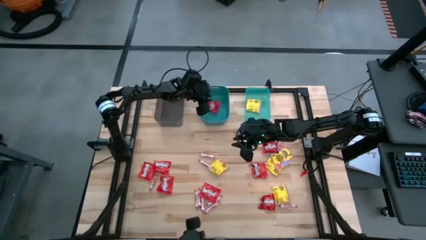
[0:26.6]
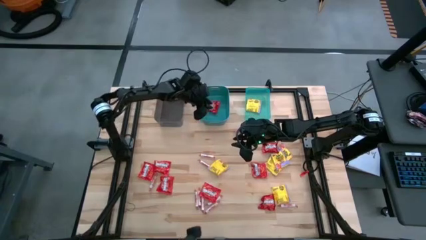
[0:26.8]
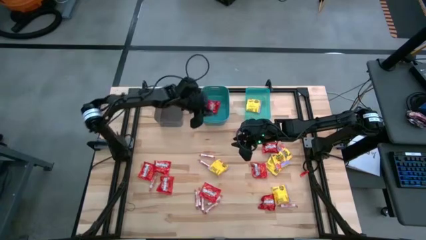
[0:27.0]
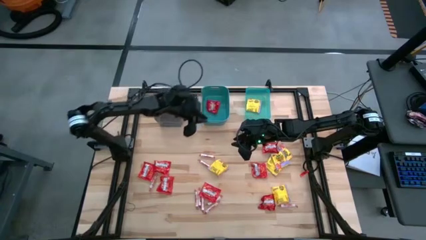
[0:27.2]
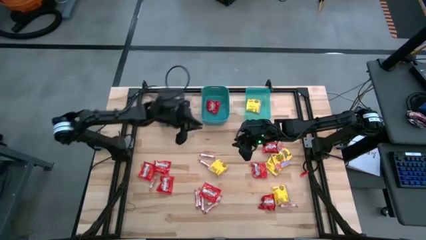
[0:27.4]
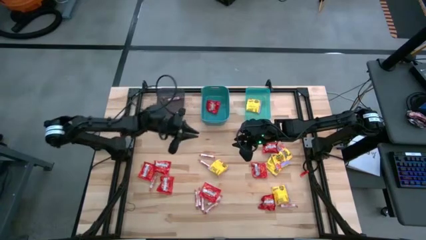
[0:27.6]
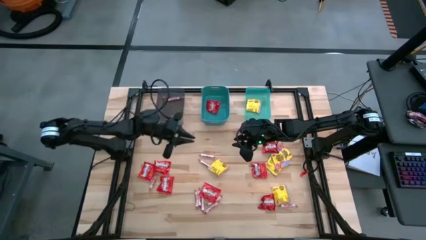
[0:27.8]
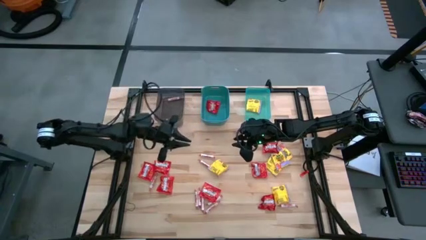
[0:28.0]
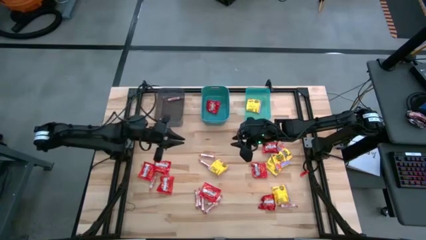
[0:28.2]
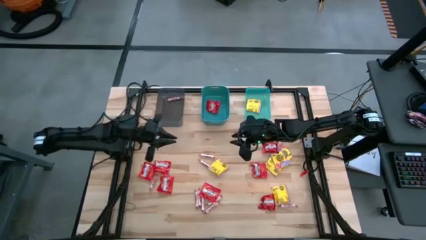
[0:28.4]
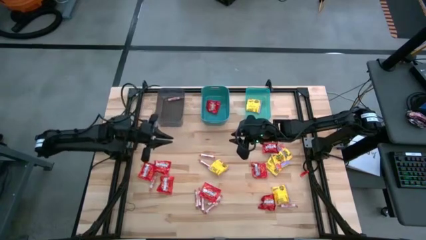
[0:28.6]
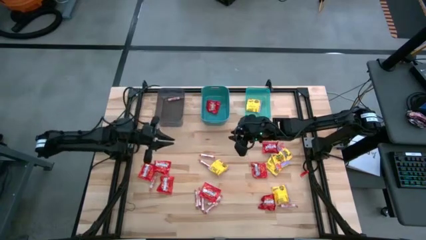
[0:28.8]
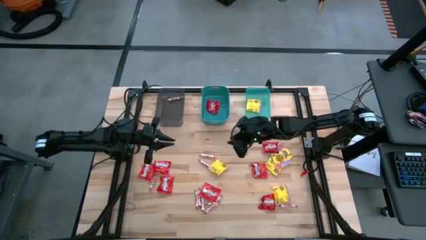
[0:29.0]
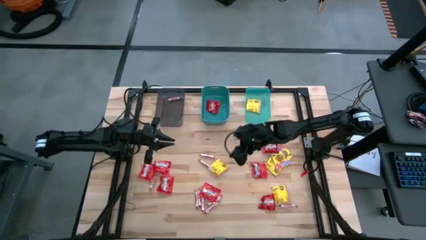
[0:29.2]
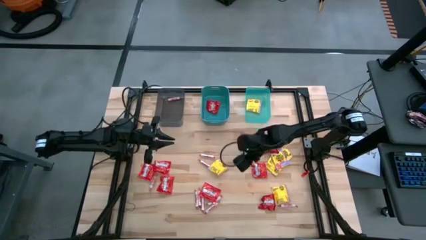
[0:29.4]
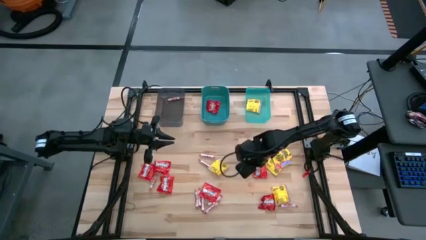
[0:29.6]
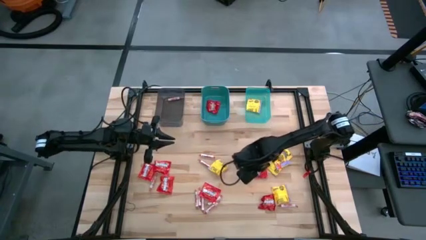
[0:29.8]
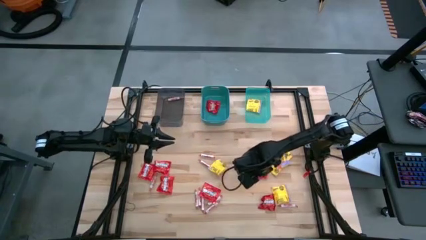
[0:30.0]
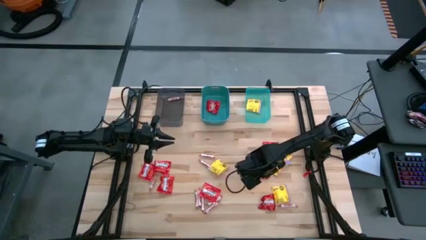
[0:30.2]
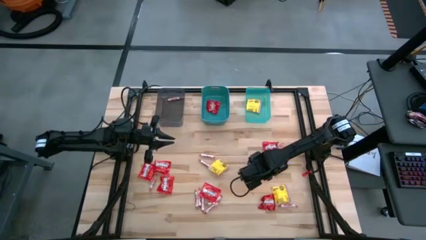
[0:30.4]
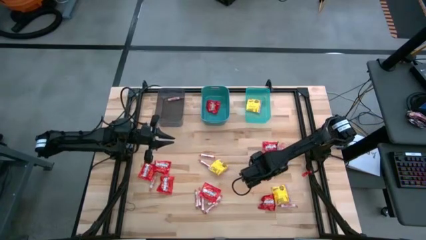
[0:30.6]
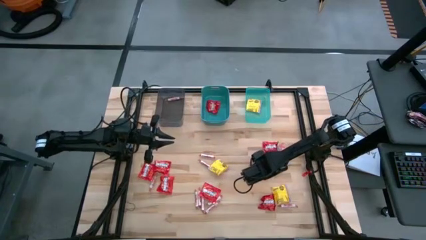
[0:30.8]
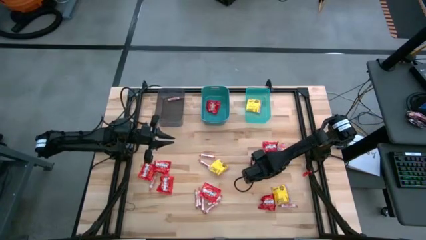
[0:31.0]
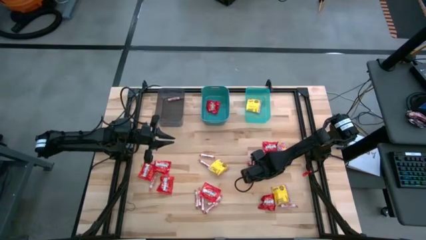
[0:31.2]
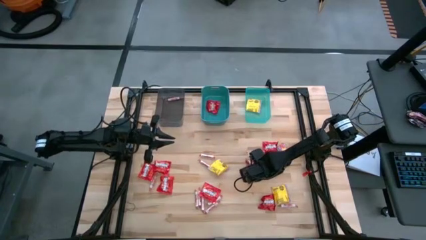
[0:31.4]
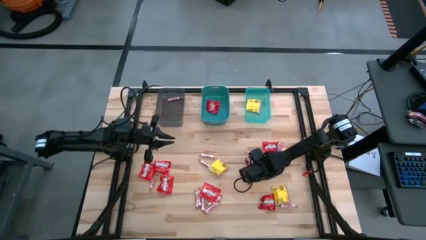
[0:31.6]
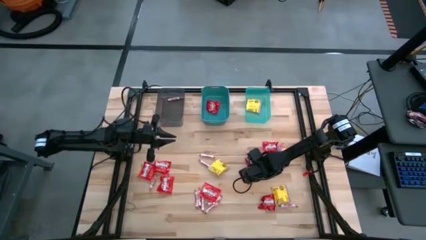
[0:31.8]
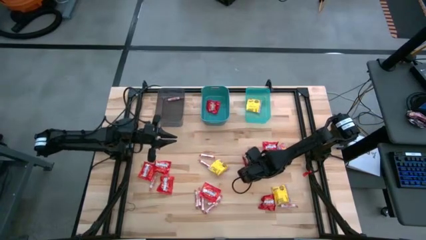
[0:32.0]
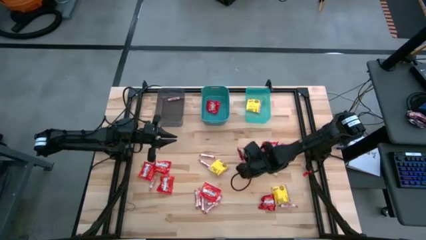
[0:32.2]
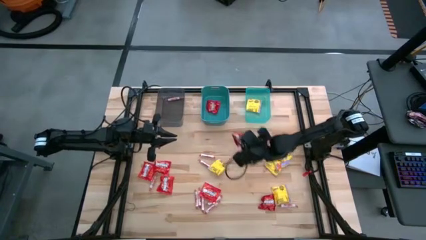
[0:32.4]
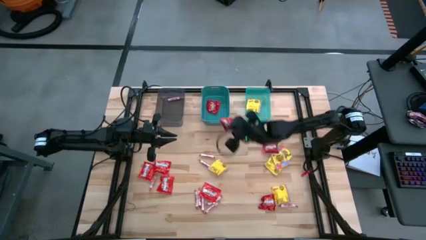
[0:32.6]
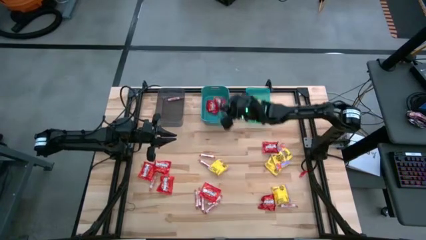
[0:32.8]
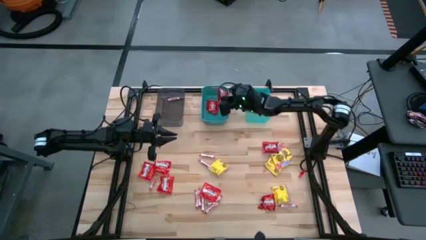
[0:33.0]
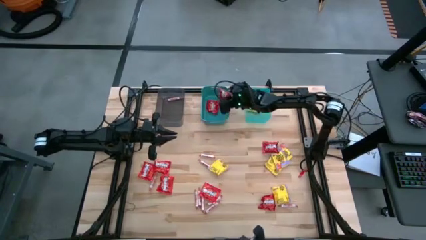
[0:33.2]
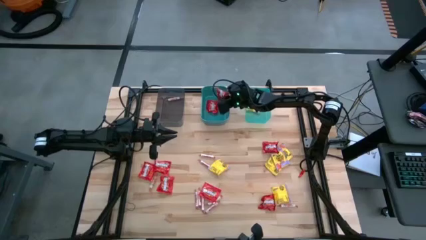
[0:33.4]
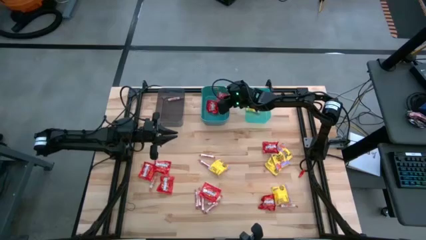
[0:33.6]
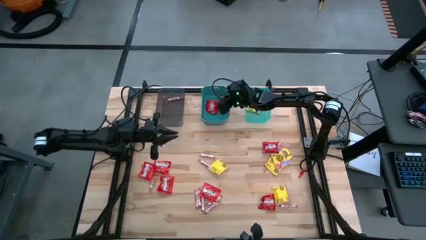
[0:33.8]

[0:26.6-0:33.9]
Task: Sort candy
Put the middle right red candy on the dark green bin

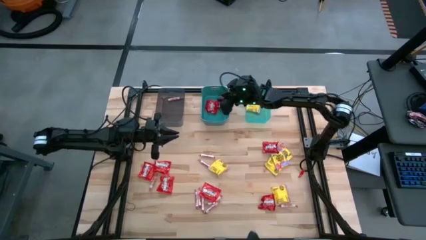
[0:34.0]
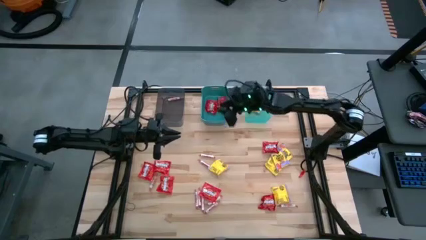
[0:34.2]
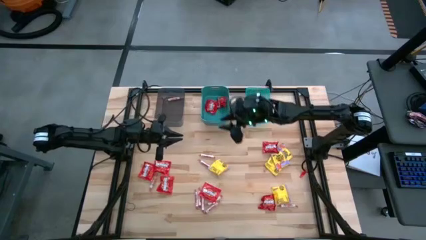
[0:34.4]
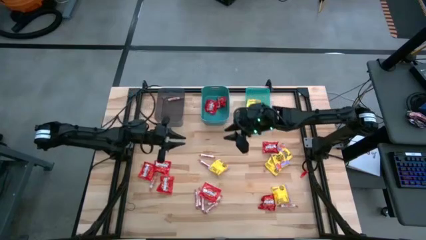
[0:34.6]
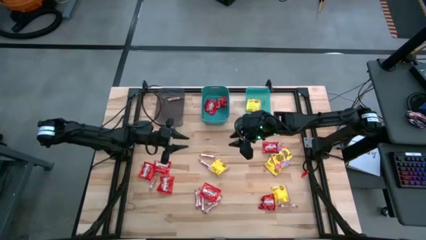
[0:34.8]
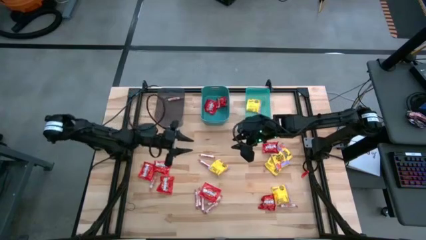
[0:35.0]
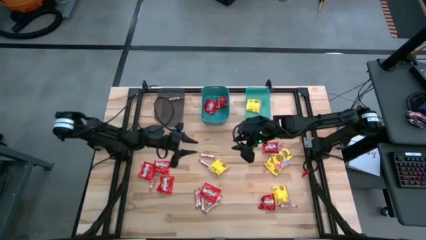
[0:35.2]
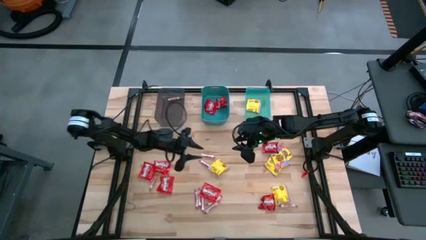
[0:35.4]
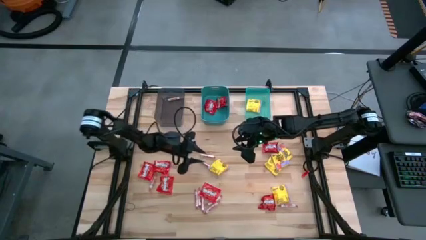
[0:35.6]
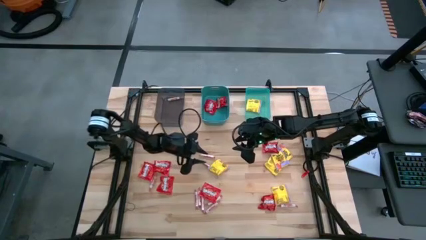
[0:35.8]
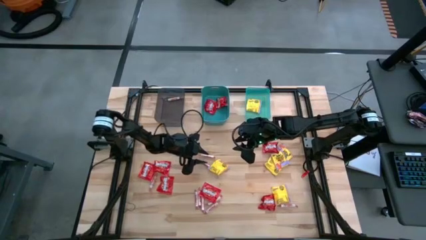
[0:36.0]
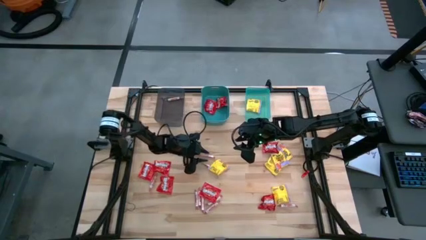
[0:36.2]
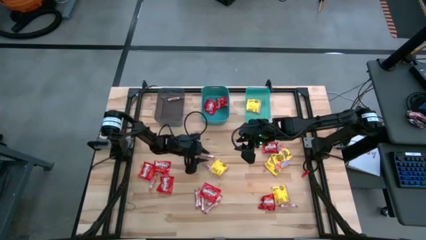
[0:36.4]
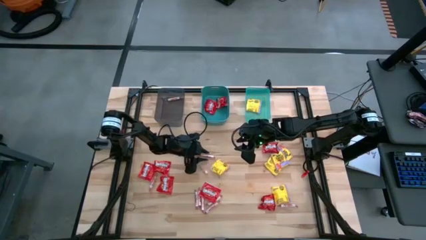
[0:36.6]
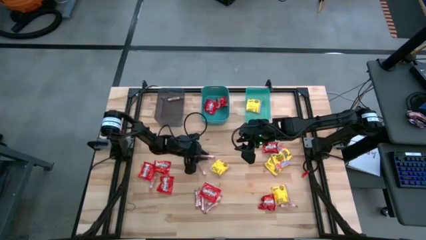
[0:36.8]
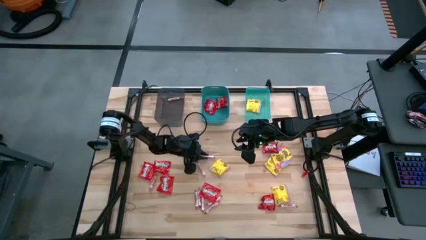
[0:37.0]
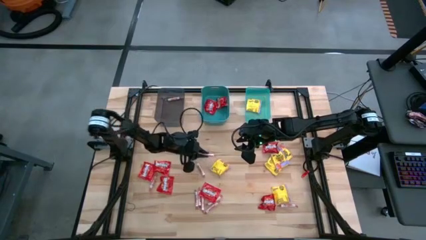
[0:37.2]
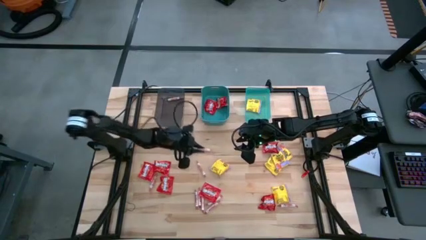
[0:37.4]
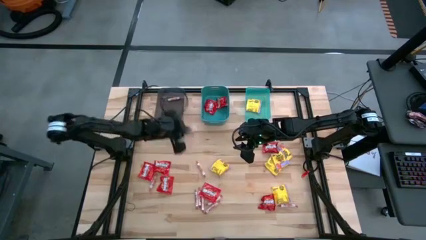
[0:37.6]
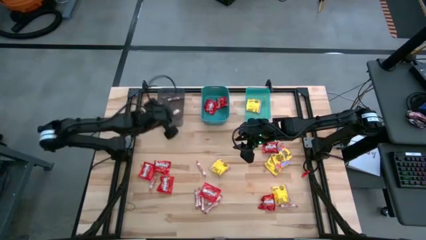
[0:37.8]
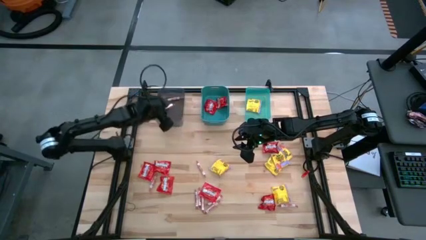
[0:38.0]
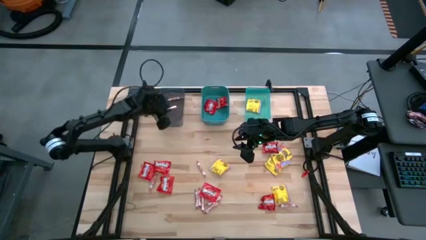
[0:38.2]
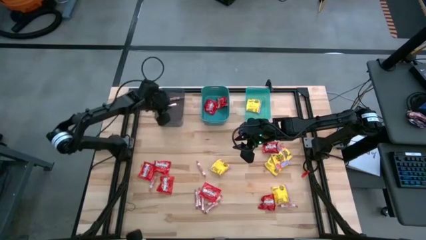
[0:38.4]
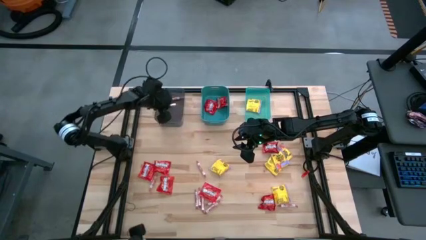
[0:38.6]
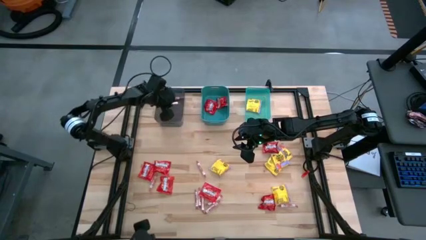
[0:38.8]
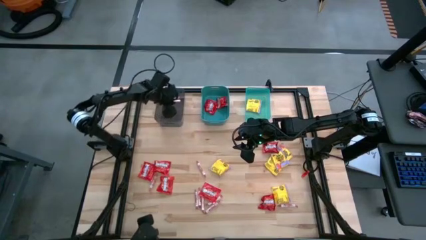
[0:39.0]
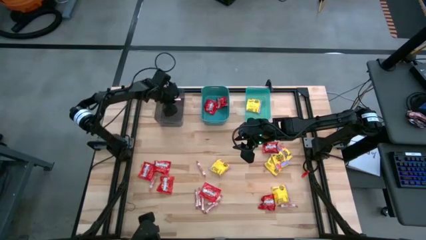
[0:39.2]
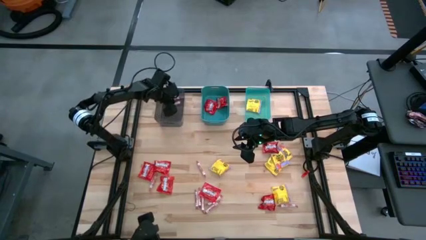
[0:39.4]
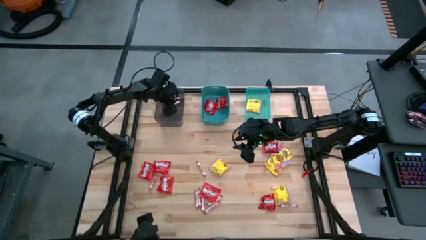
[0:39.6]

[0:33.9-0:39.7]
Put the white candy on the black bin

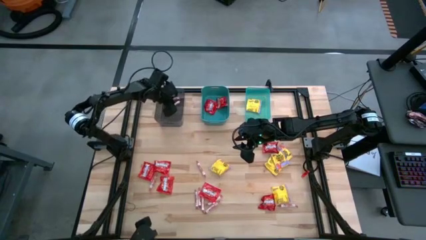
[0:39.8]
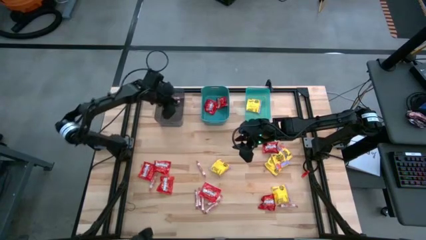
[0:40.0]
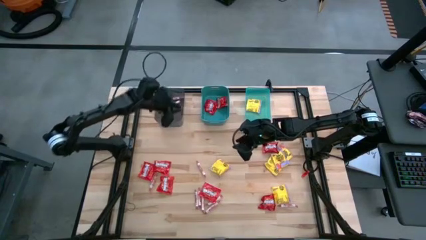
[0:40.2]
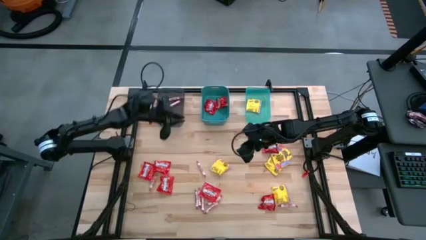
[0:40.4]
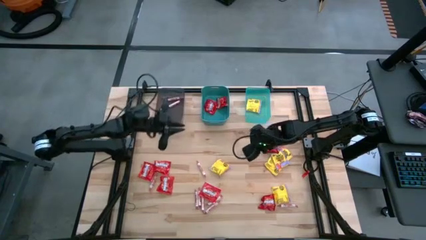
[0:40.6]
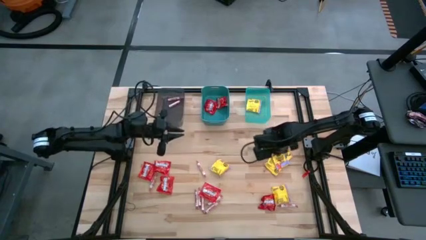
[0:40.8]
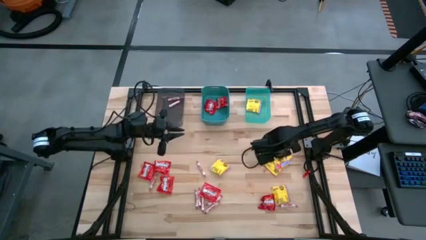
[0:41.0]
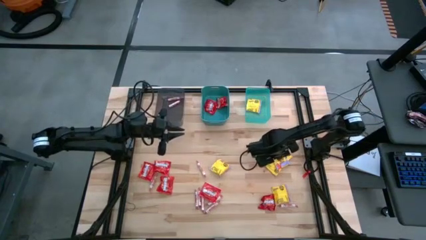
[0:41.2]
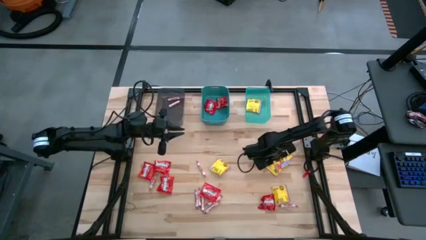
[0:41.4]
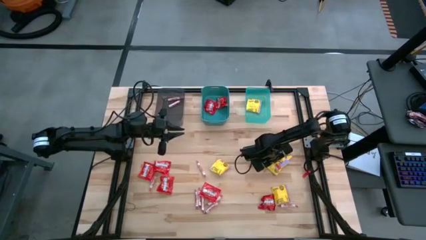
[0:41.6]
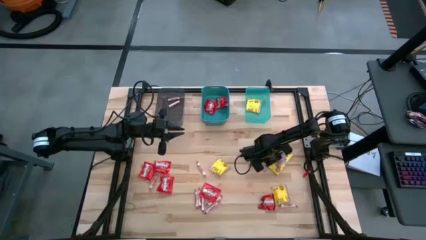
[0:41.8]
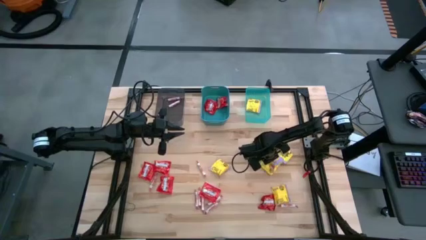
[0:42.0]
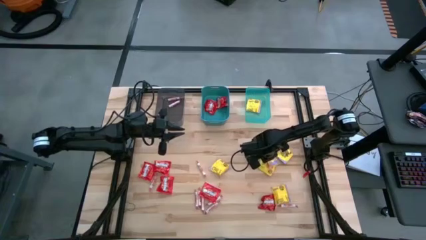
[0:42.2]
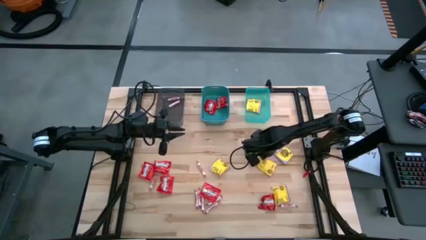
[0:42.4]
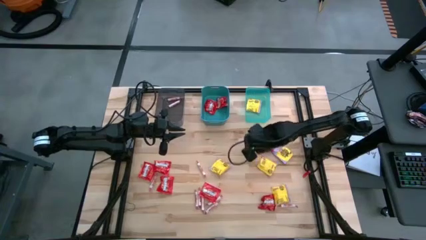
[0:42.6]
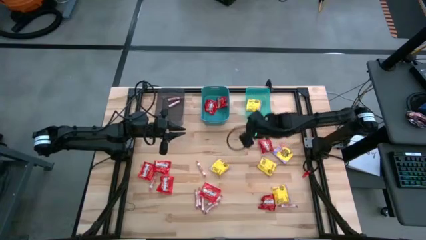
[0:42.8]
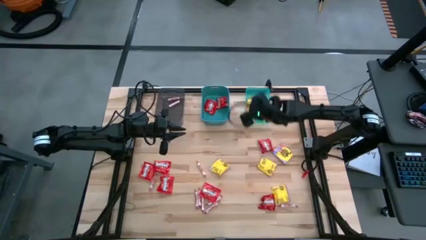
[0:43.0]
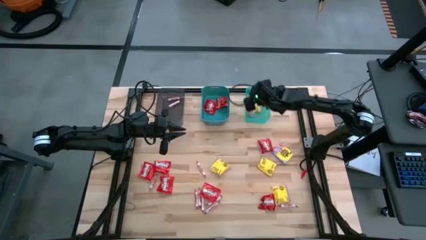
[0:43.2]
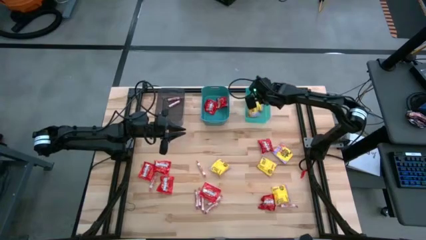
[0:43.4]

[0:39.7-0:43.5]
Put the yellow candy on the light green bin

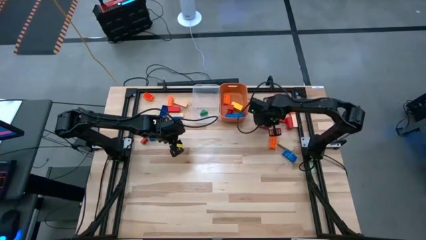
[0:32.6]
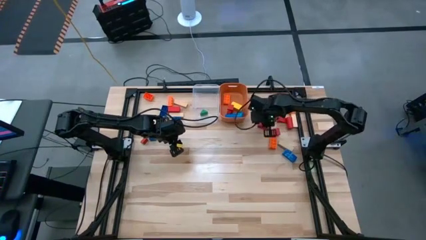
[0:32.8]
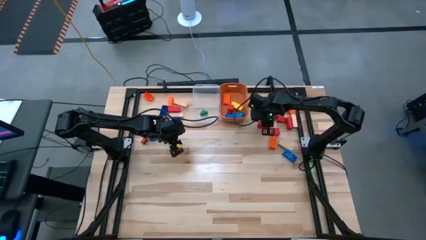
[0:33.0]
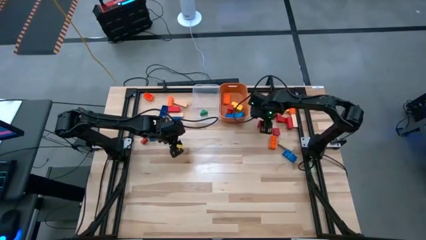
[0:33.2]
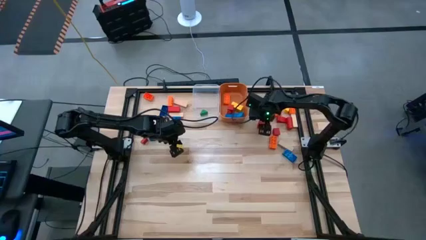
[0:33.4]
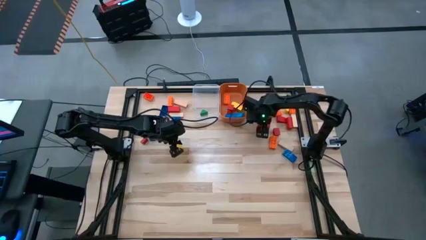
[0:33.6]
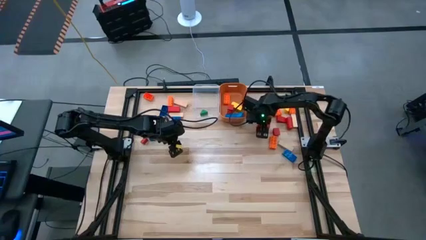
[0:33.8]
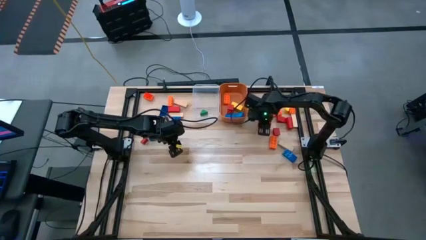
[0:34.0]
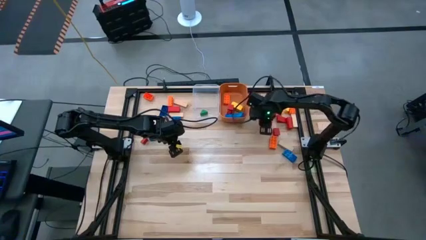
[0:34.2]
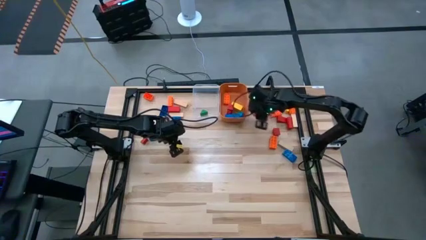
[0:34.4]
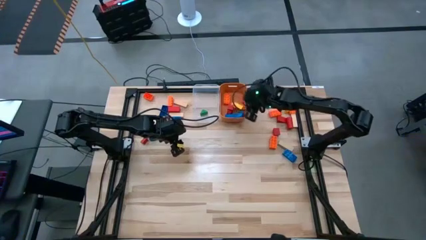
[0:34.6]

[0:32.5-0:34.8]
Task: Sort blocks by size
Put the red rectangle block into the orange bin
